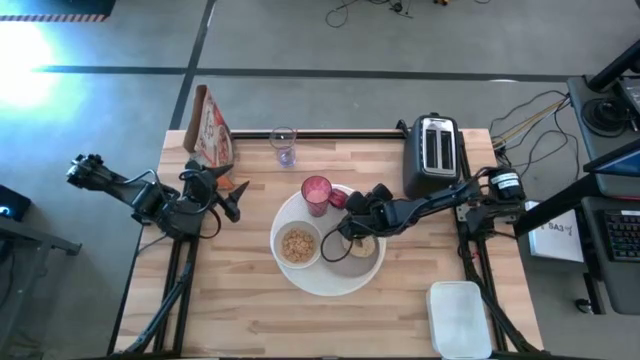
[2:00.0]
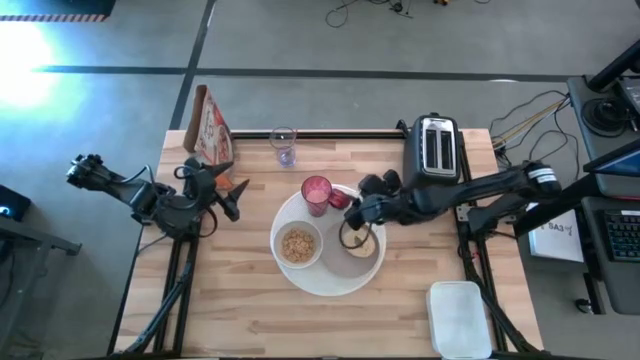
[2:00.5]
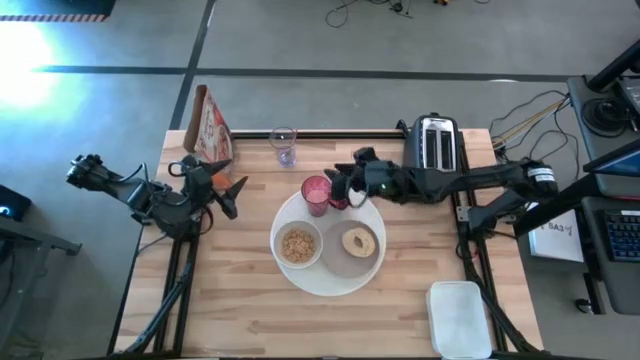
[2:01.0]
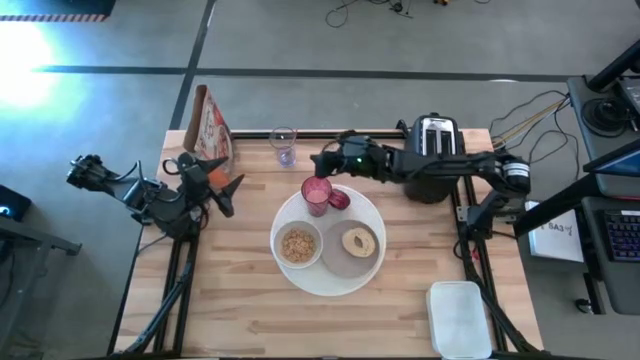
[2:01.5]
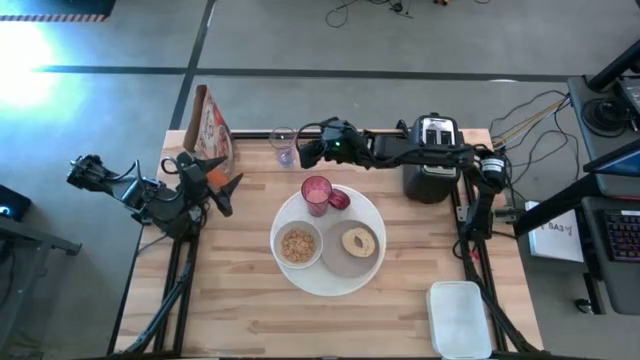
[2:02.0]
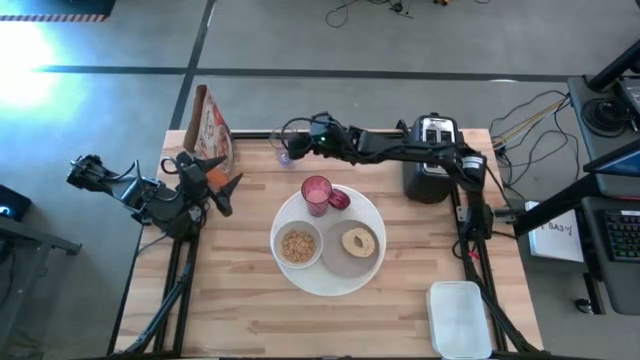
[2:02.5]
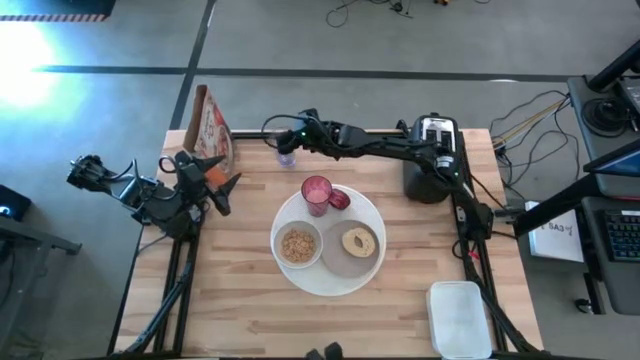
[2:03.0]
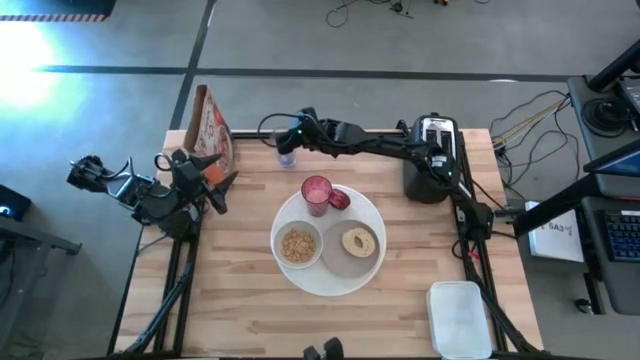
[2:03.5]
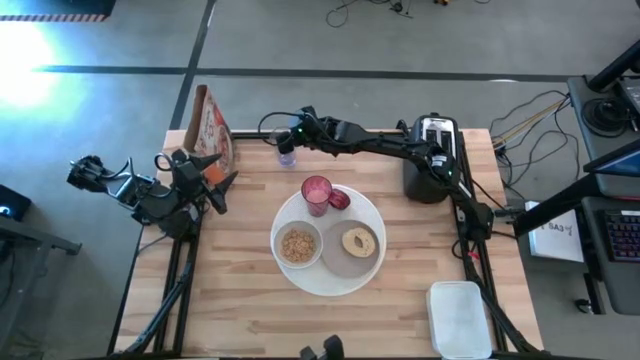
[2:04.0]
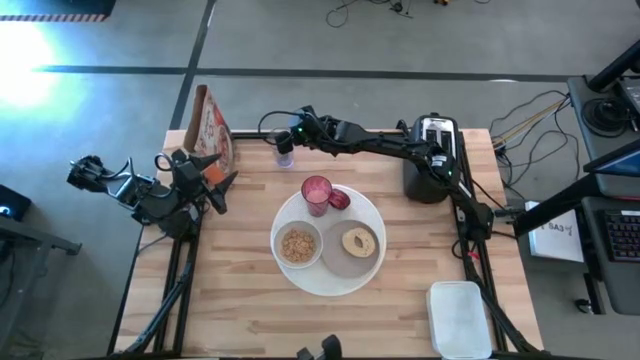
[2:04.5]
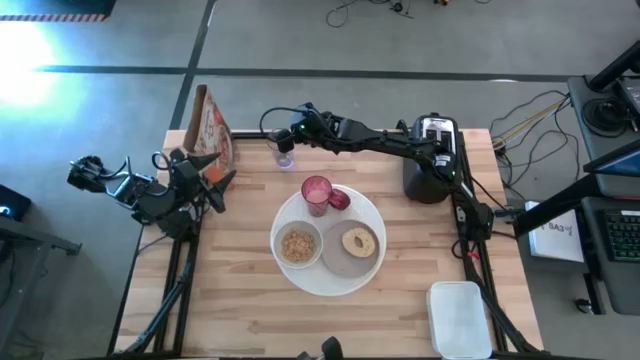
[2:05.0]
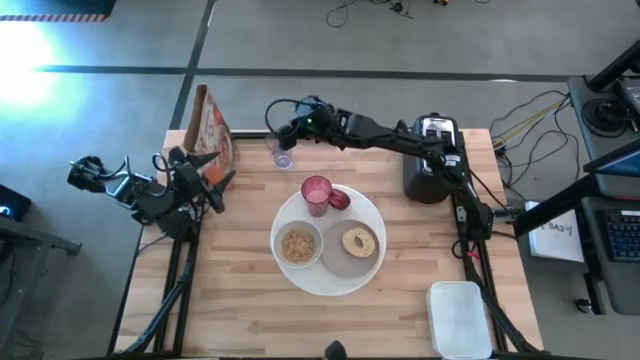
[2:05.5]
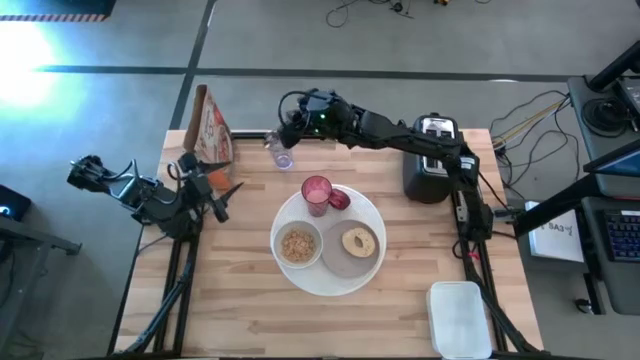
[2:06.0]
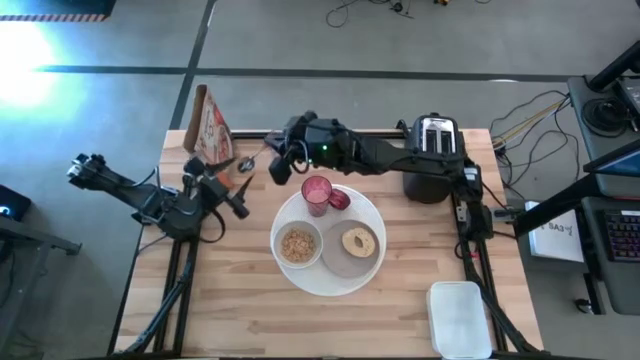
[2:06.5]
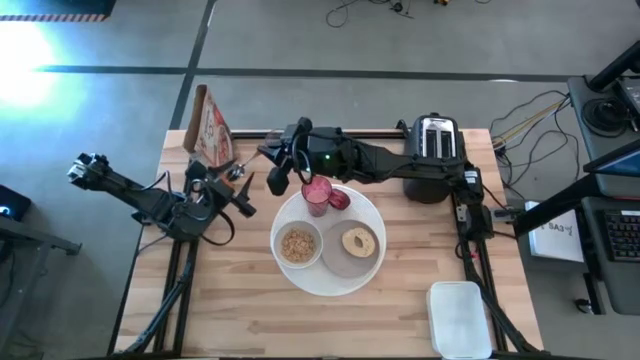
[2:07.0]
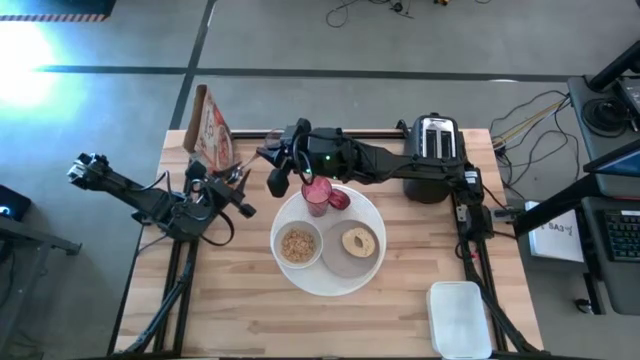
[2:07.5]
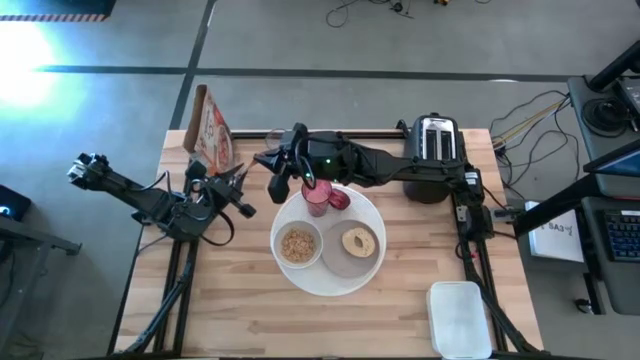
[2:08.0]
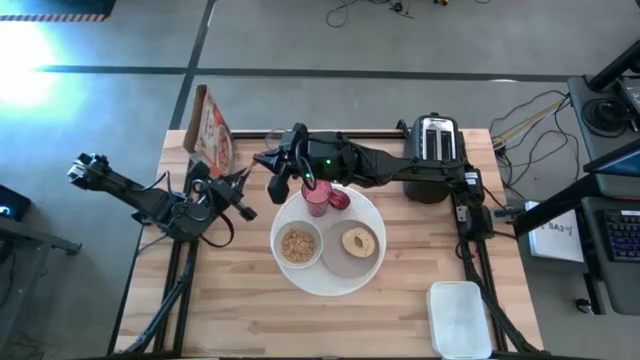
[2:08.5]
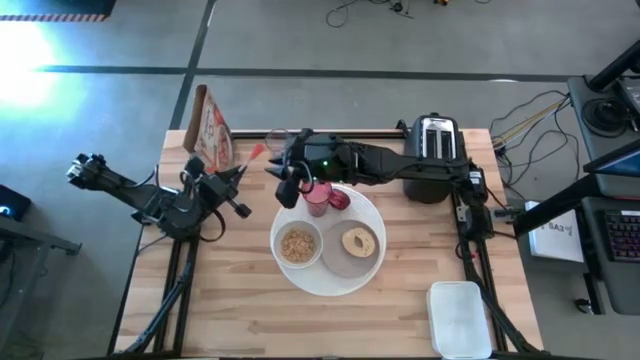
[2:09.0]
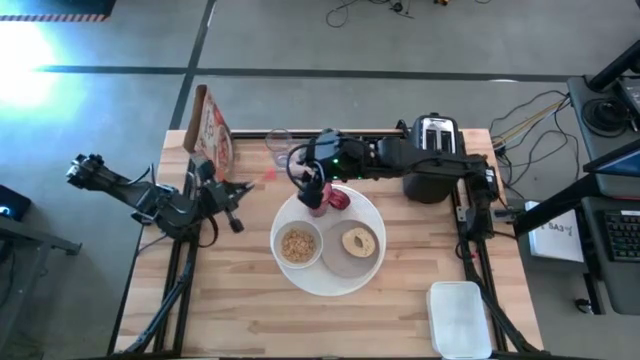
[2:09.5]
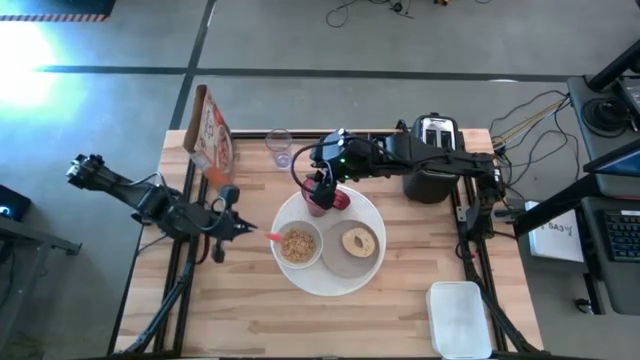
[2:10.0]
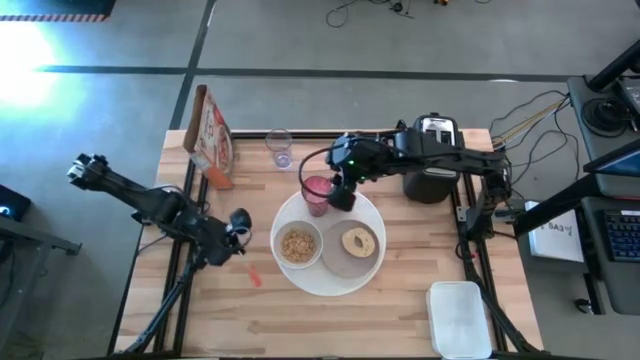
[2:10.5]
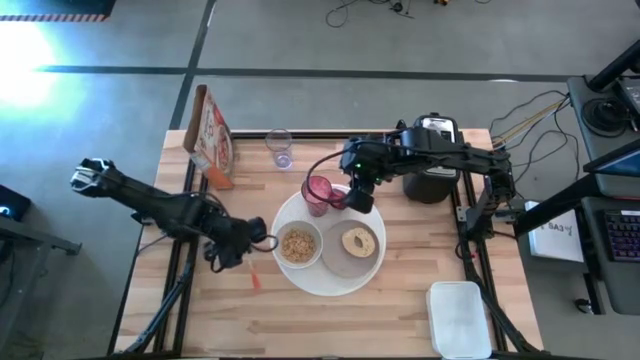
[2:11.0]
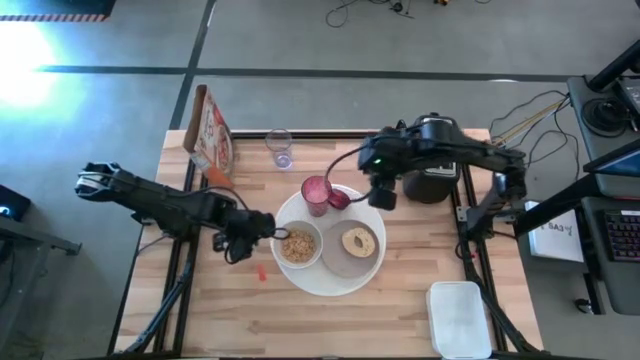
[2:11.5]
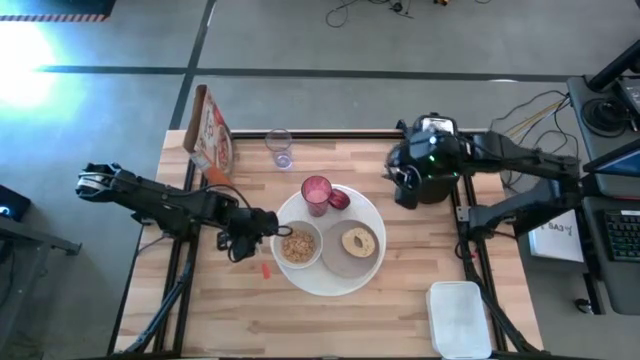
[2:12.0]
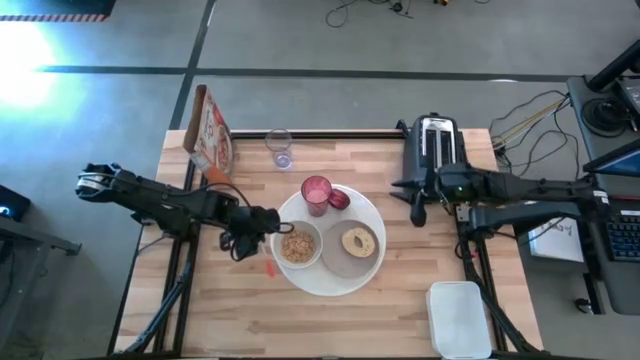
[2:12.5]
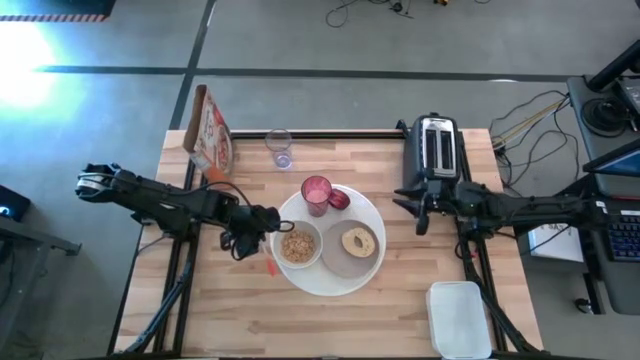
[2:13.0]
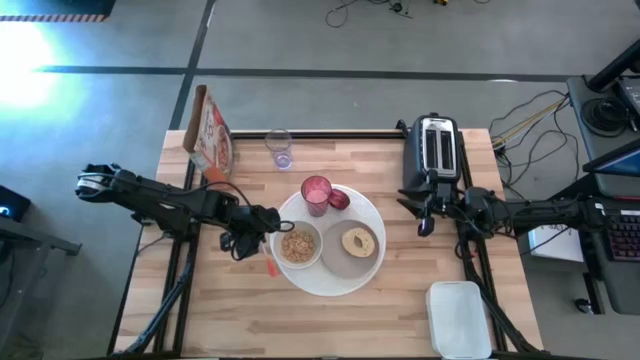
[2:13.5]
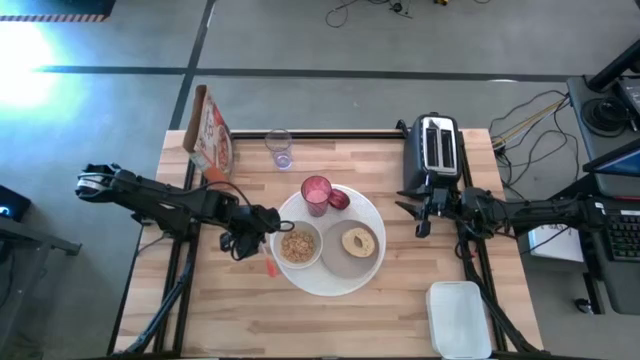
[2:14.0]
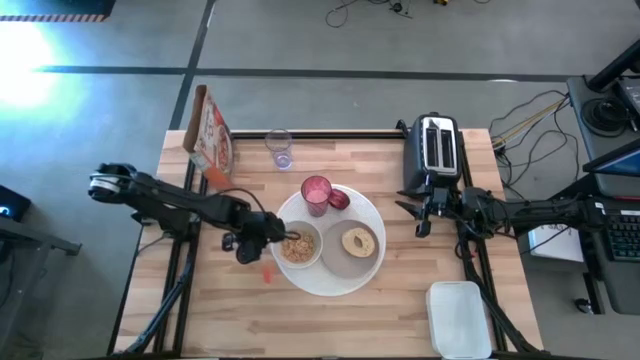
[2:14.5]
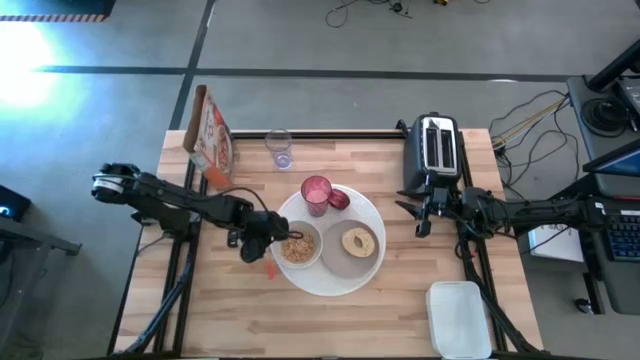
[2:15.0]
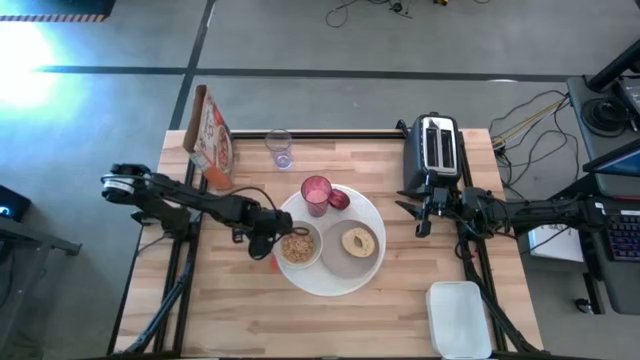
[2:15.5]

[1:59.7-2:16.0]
Task: Arrange a breakfast setting
Put the orange spoon to the left of the white table mat on the table

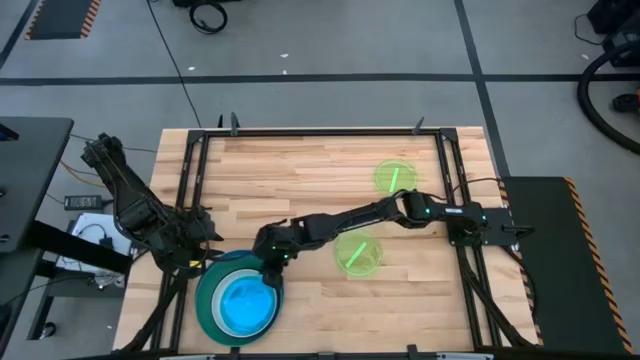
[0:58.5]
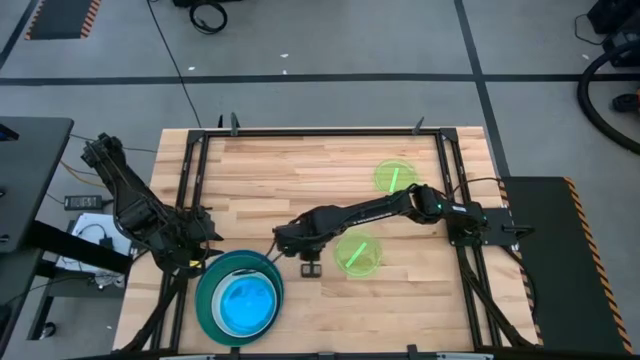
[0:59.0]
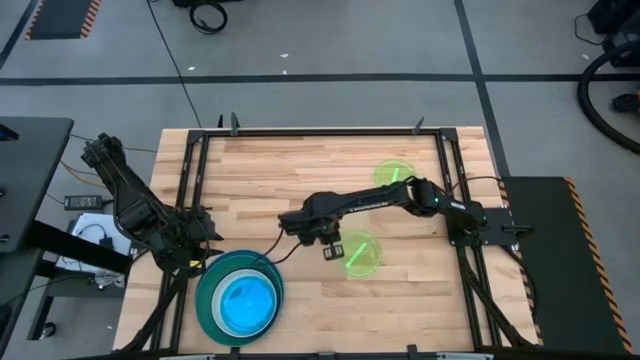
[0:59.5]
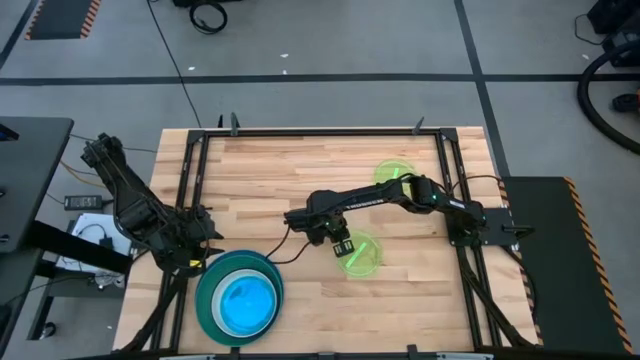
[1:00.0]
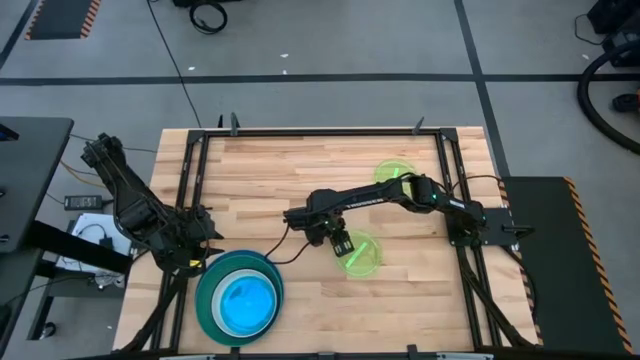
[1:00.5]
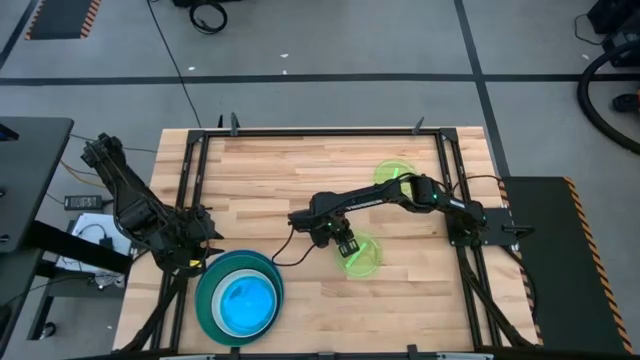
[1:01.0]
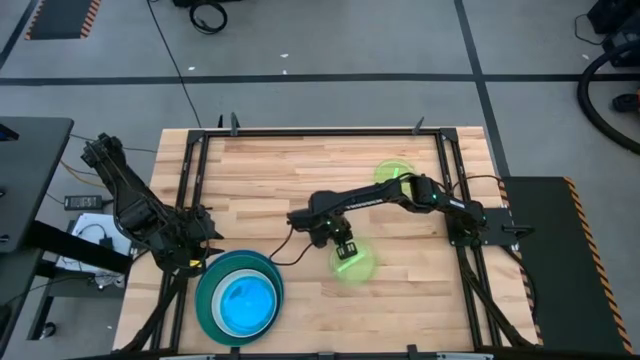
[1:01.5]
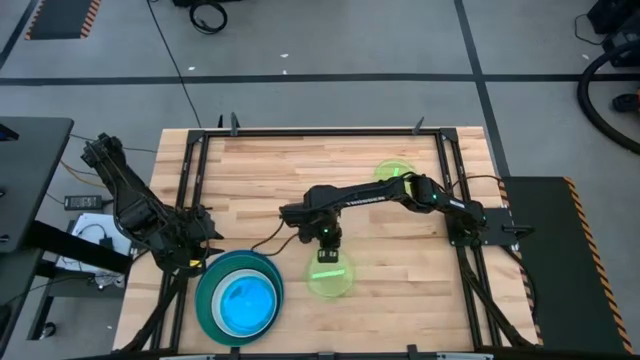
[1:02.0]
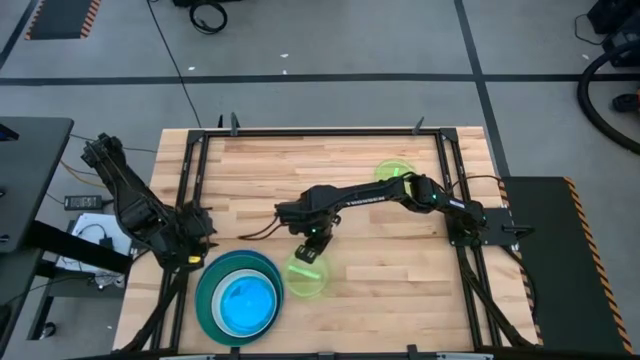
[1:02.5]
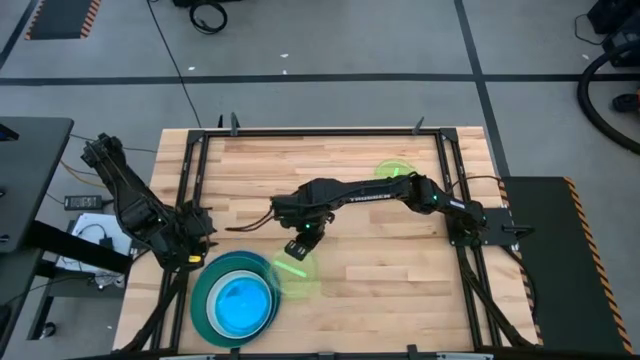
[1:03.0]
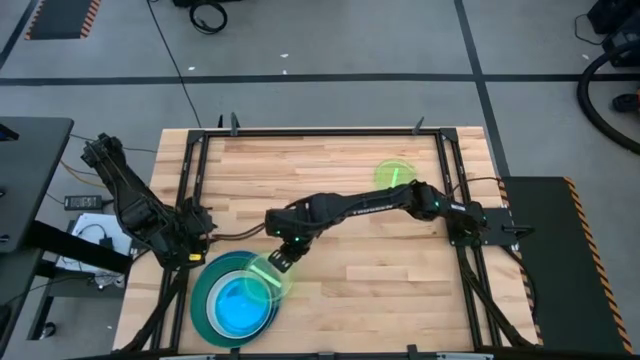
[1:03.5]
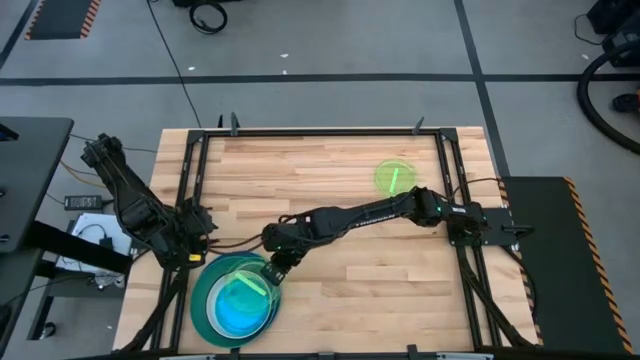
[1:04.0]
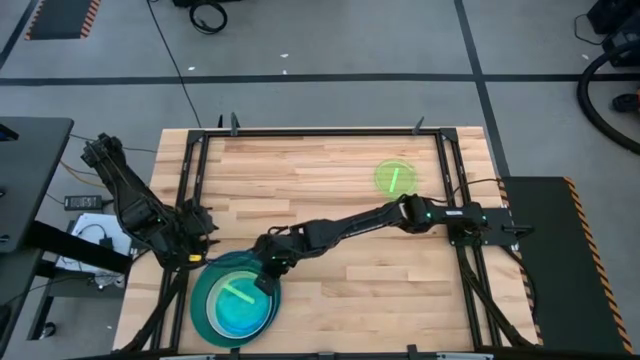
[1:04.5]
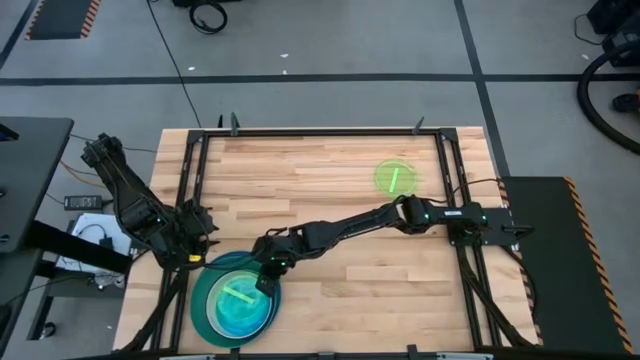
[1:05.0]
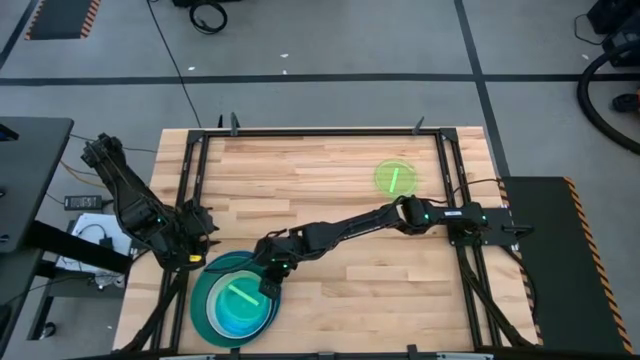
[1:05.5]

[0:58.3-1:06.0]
Task: Stack plastic plates
Stack the bottom light green plate on top of the light blue plate
